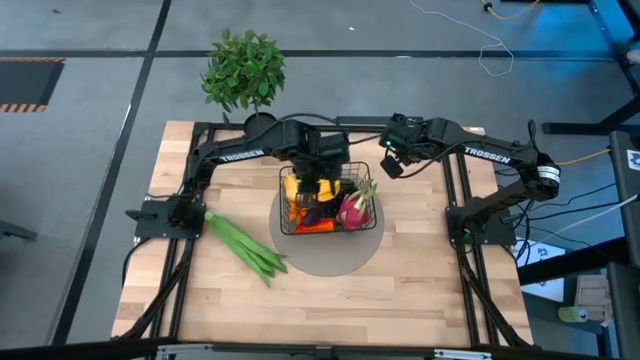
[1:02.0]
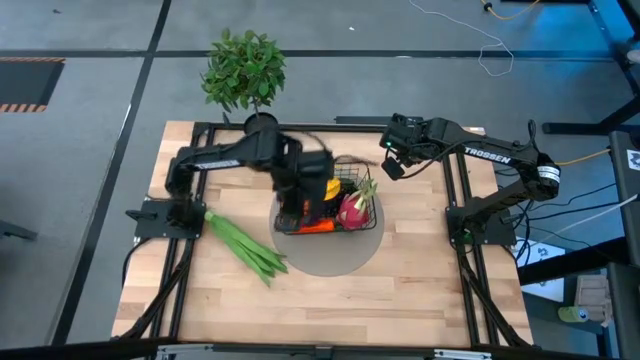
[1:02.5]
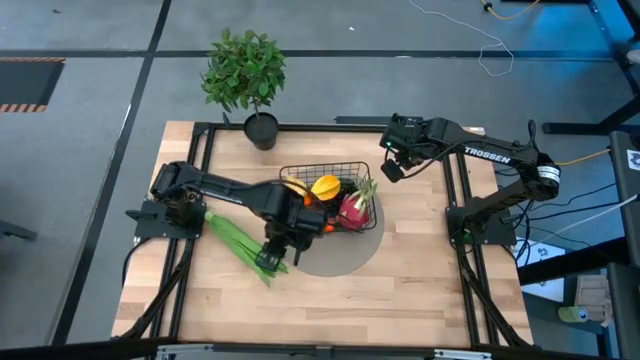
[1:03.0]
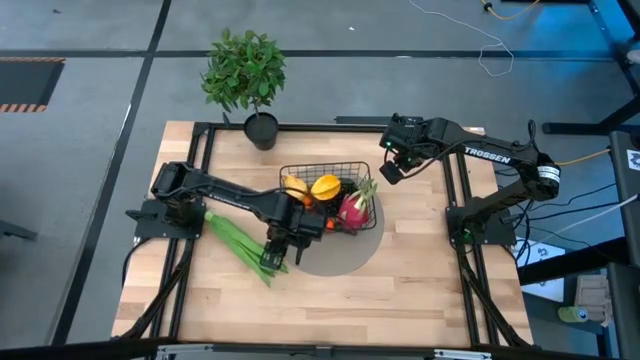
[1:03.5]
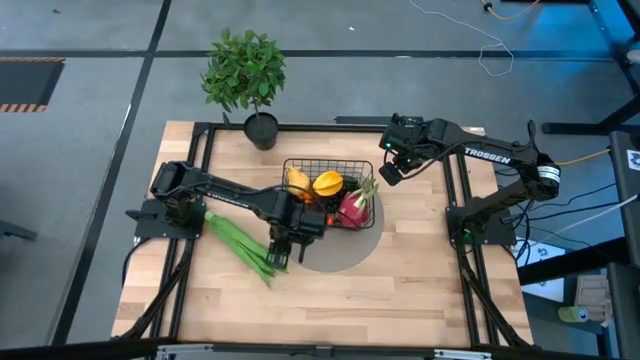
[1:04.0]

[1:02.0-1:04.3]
Task: Build produce basket
Adjust the black wire basket

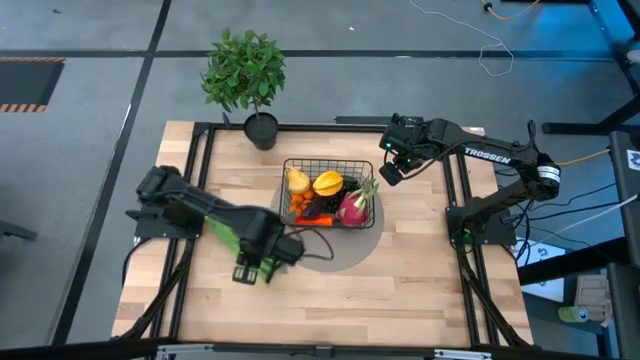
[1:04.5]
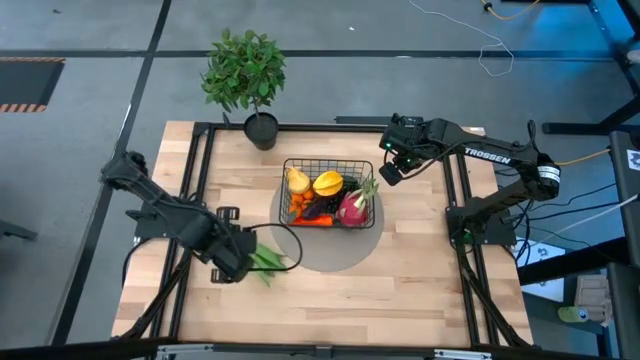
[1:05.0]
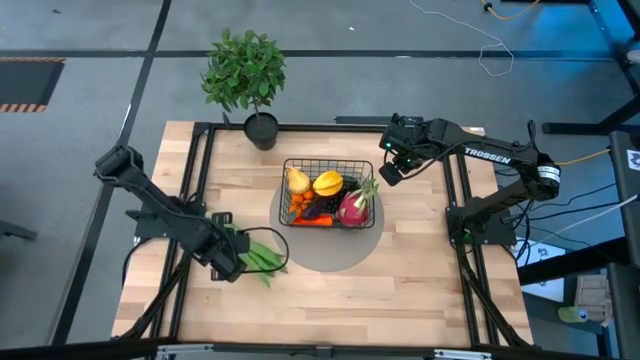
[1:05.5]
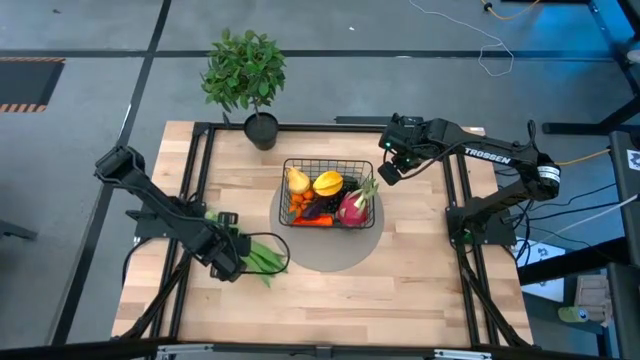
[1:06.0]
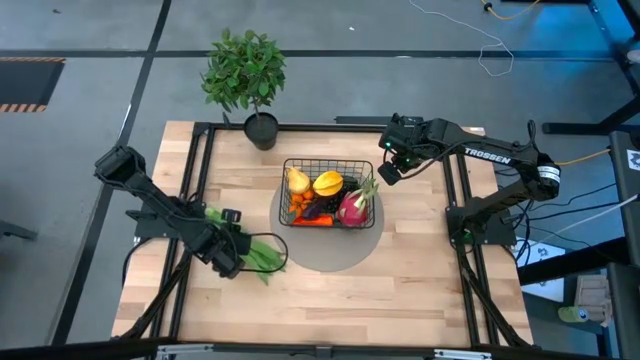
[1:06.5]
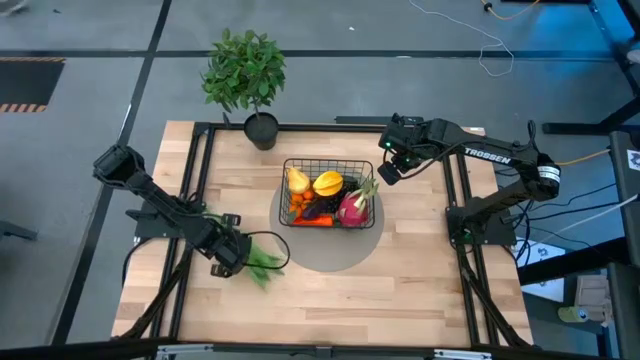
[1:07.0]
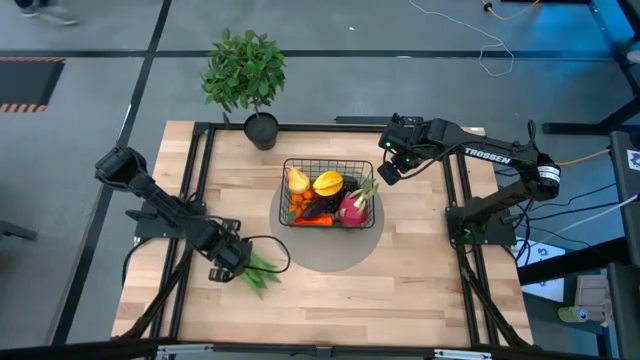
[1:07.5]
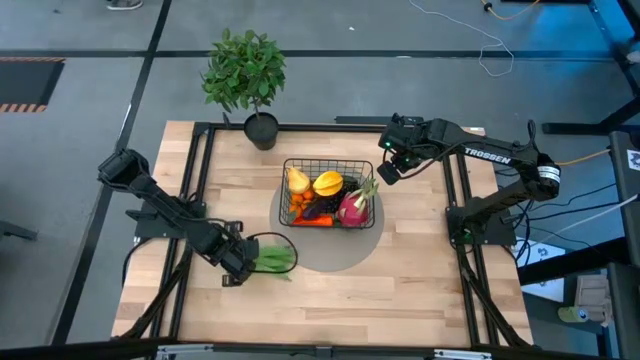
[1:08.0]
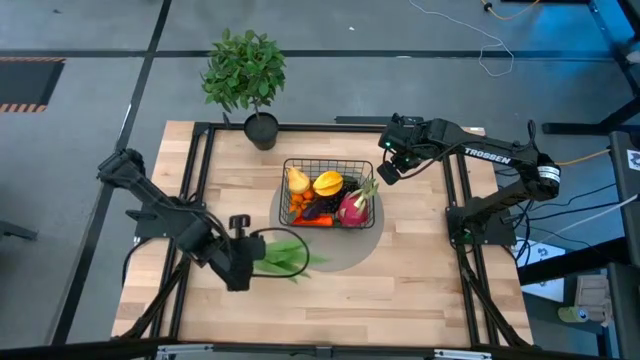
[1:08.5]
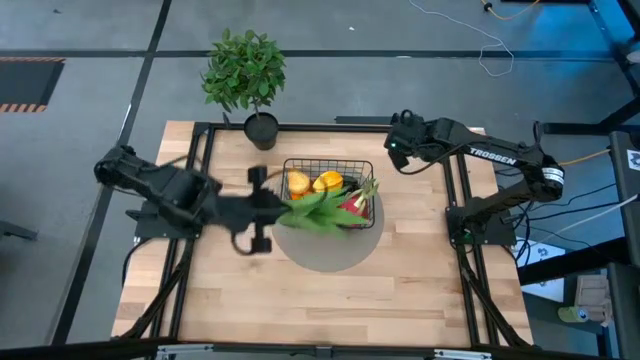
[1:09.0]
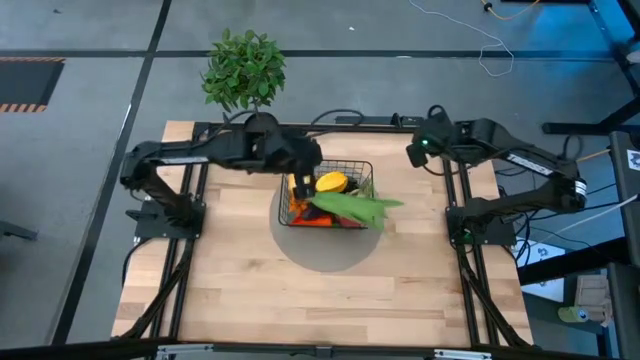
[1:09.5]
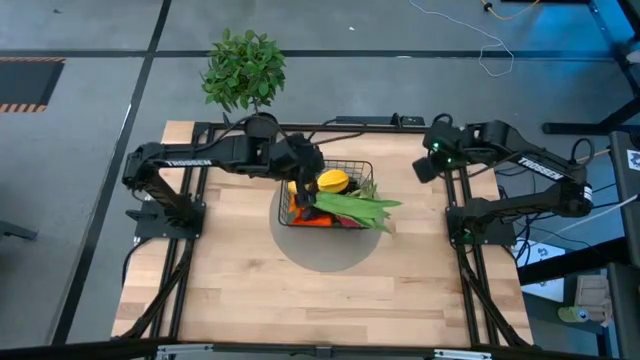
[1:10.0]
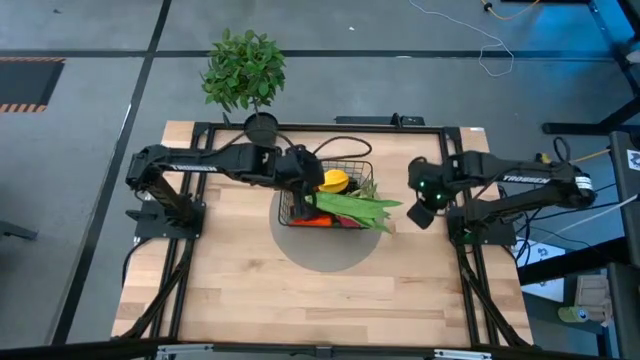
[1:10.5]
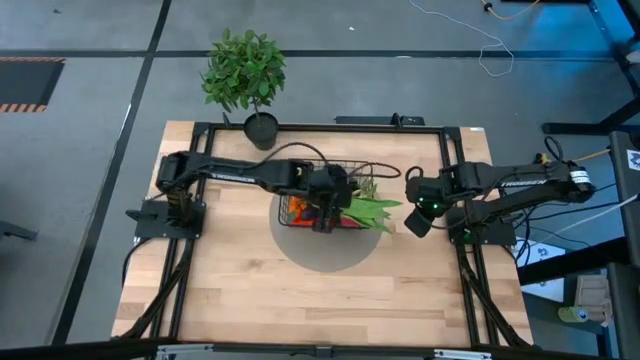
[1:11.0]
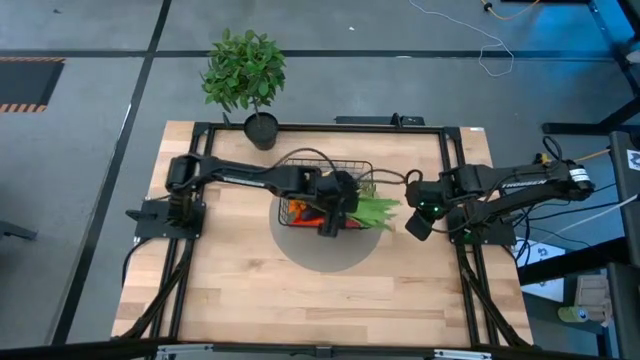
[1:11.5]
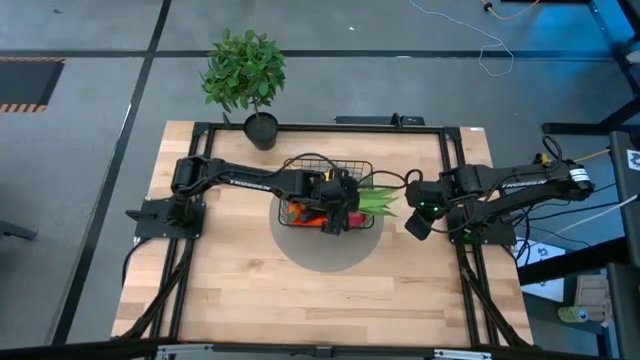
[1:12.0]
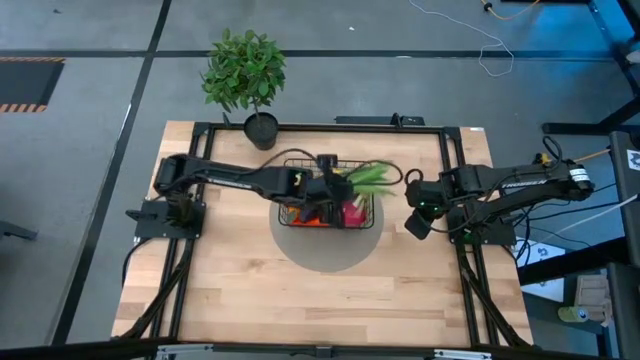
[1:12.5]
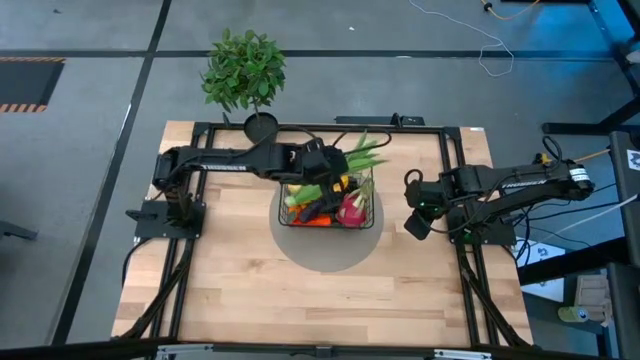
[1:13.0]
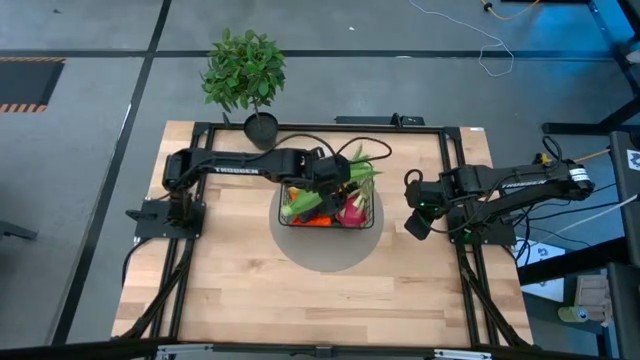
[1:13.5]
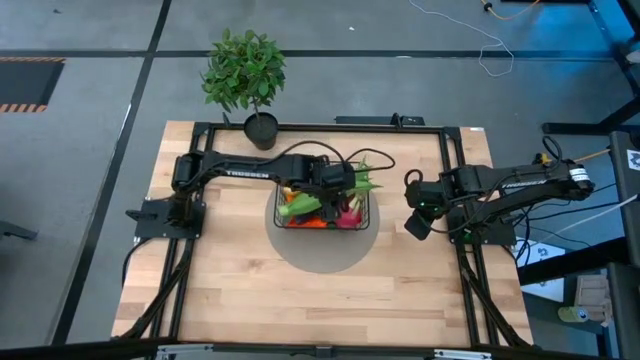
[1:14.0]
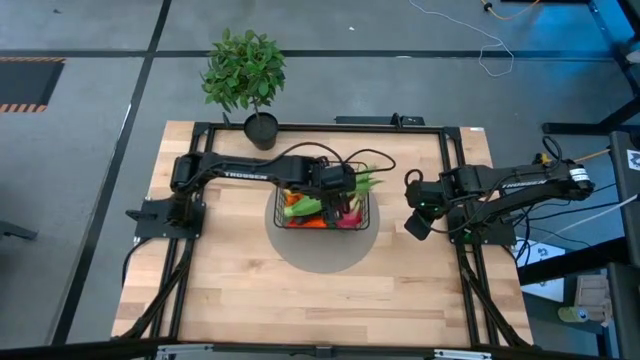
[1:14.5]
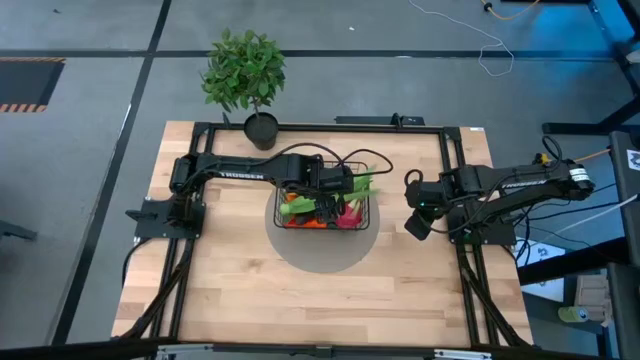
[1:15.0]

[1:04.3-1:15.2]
Put the lettuce into the black wire basket

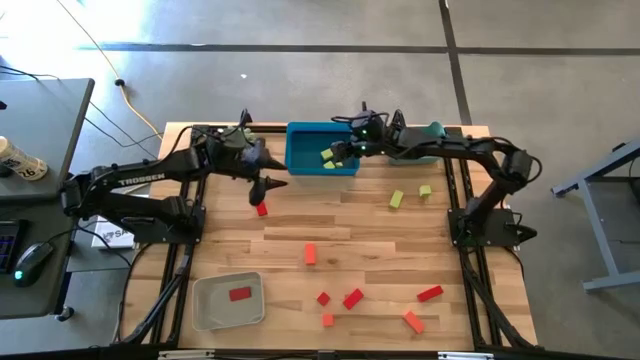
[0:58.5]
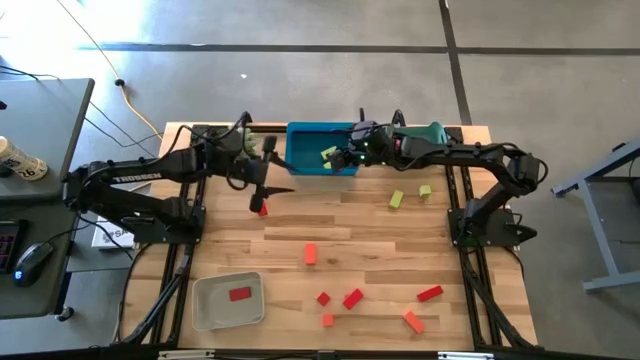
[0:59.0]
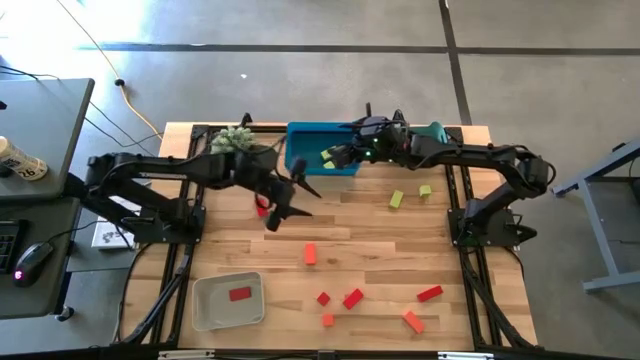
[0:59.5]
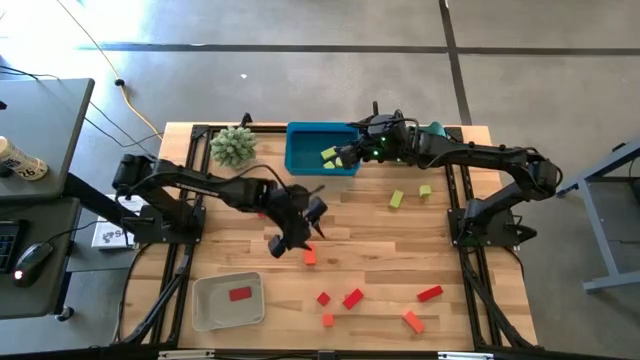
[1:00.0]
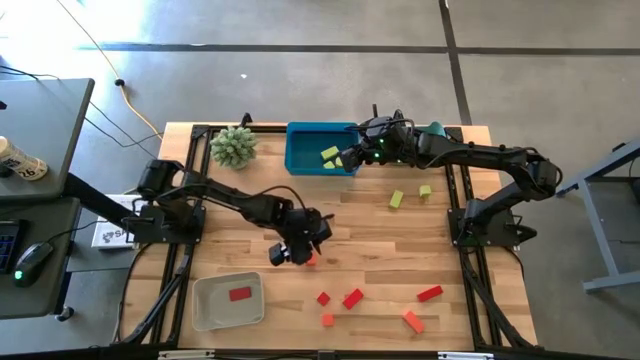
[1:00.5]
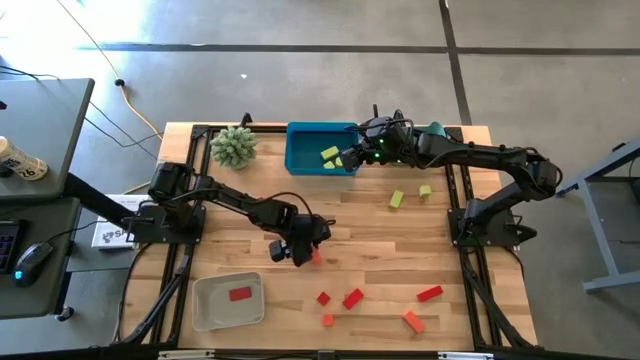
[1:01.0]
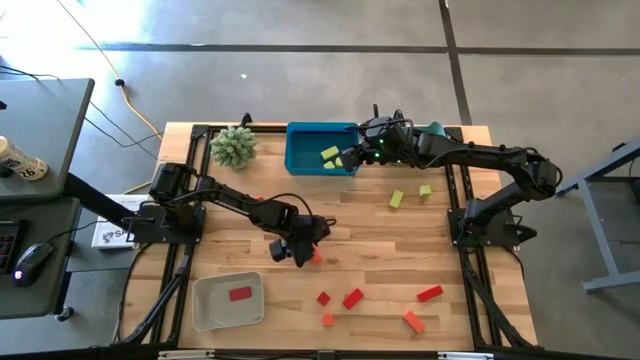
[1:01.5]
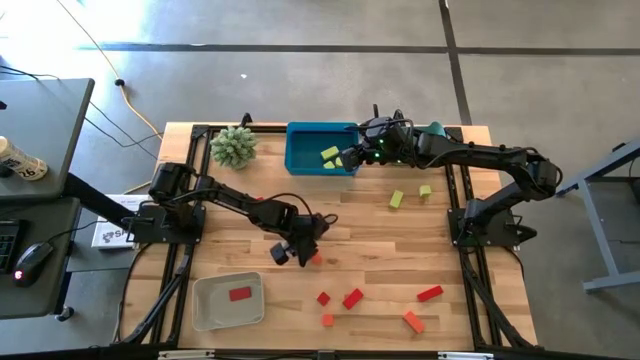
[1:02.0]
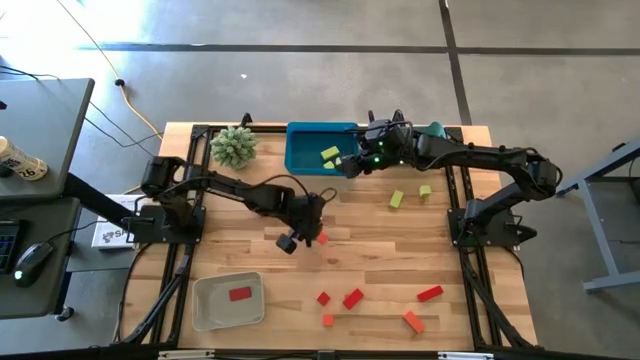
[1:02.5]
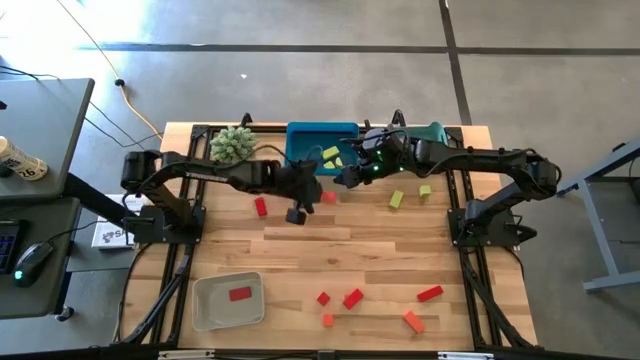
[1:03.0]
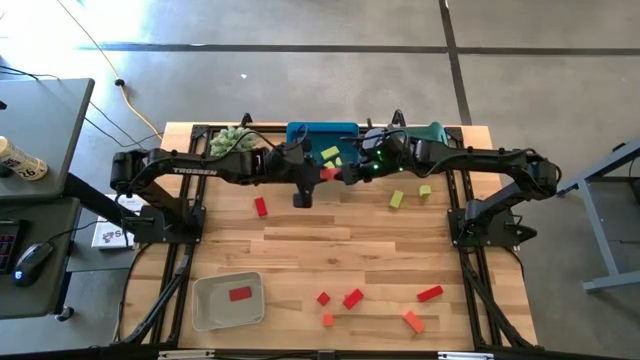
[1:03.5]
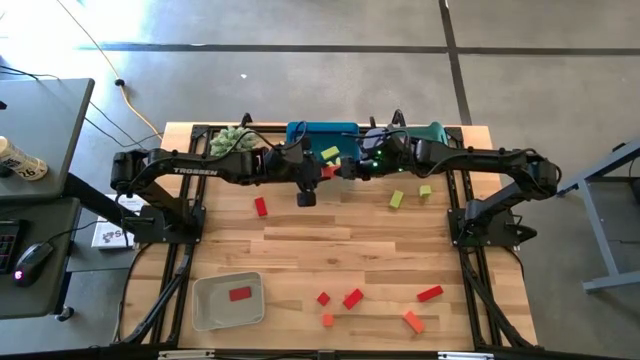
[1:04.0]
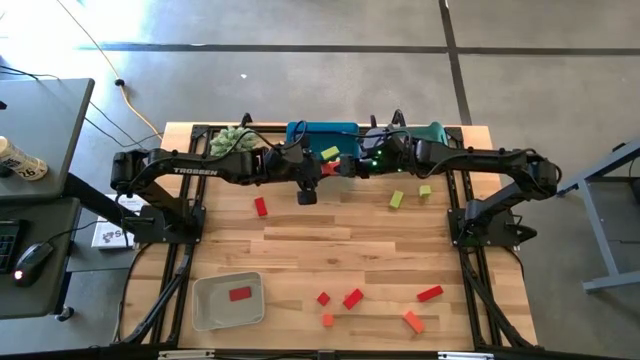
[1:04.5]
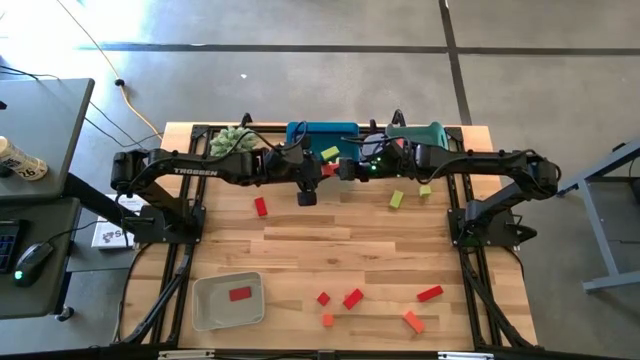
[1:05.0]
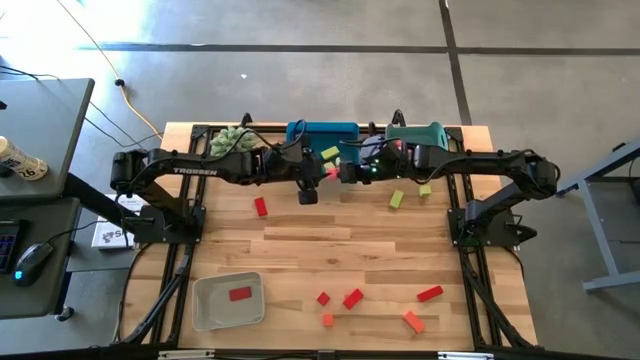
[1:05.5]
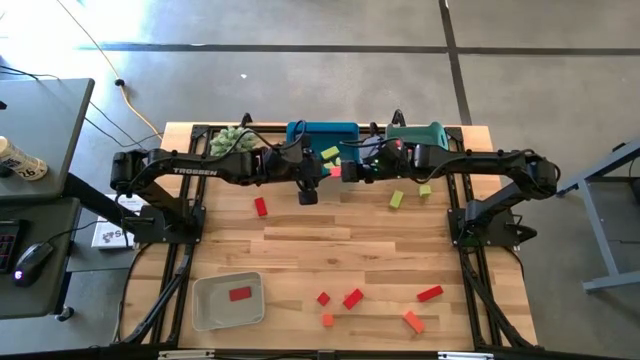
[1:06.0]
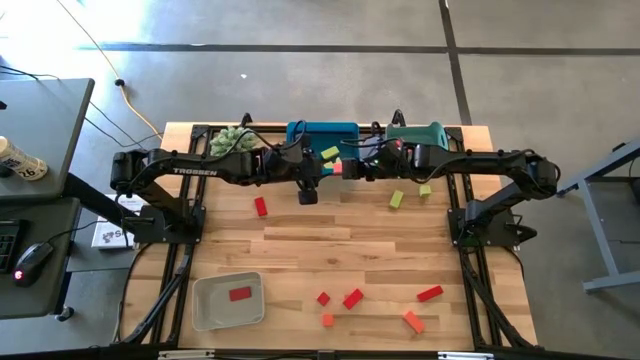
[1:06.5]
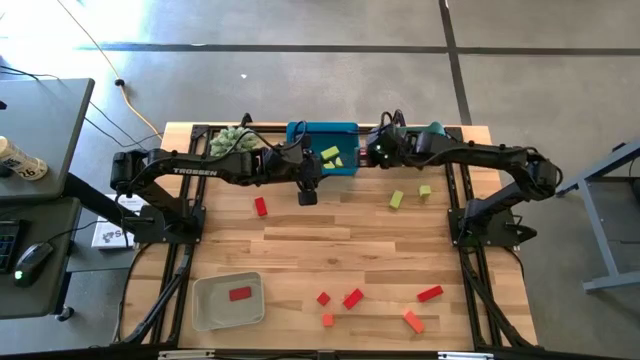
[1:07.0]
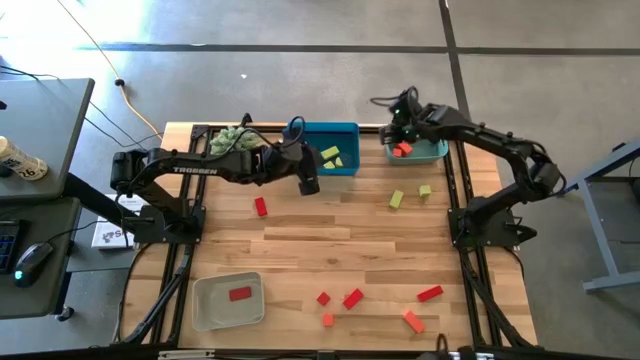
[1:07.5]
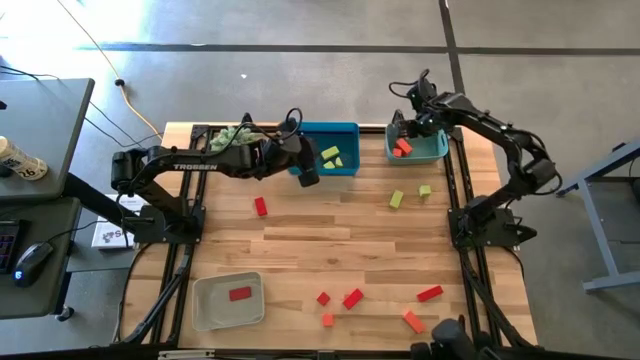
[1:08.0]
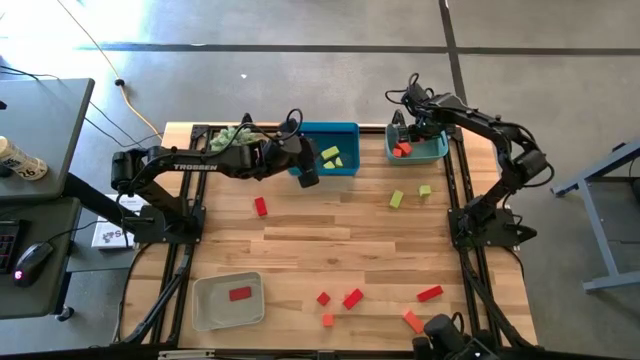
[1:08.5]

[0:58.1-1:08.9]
Task: Sort & place blocks by color
Put the orange block into the green bin
